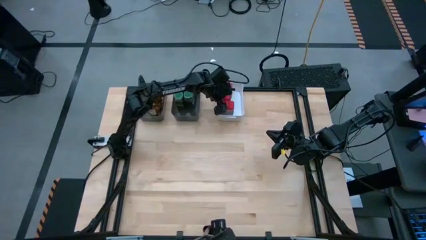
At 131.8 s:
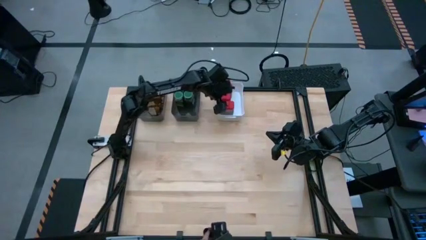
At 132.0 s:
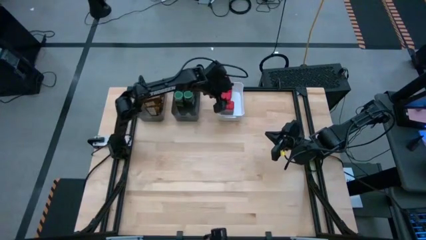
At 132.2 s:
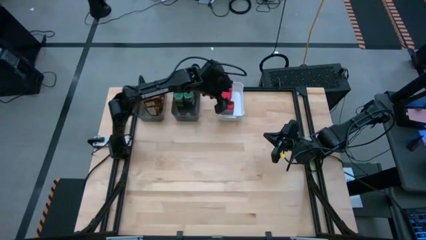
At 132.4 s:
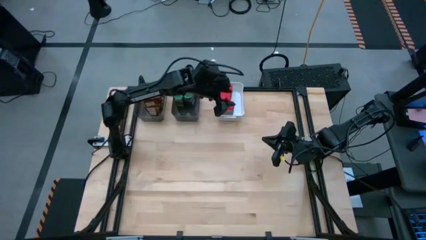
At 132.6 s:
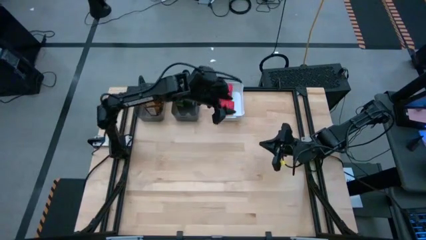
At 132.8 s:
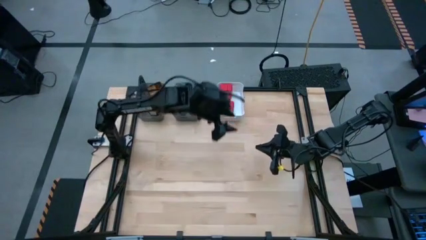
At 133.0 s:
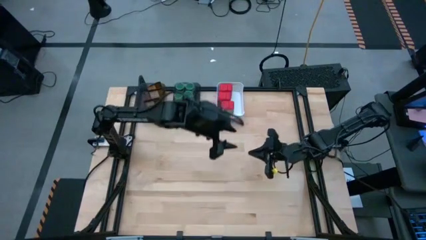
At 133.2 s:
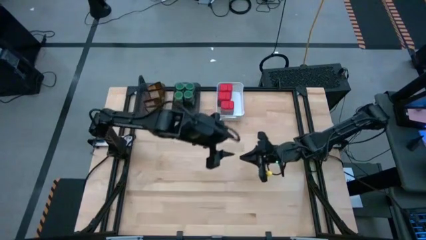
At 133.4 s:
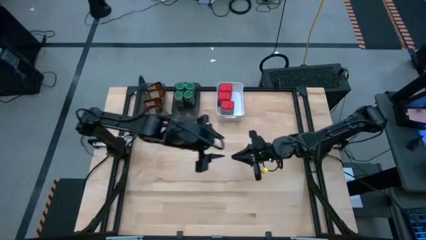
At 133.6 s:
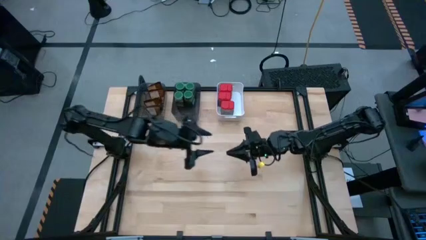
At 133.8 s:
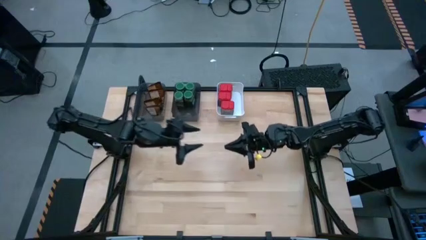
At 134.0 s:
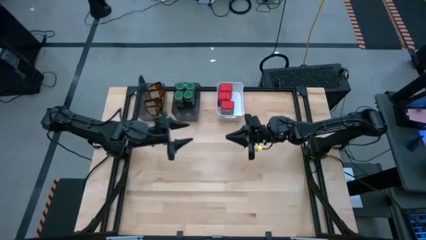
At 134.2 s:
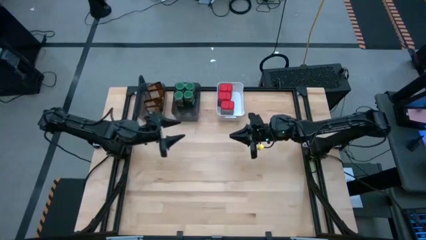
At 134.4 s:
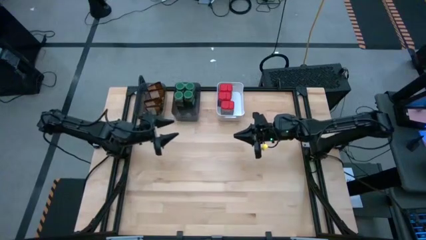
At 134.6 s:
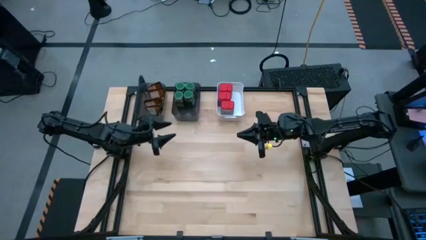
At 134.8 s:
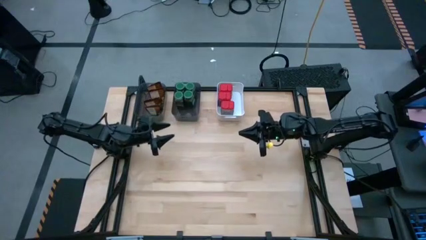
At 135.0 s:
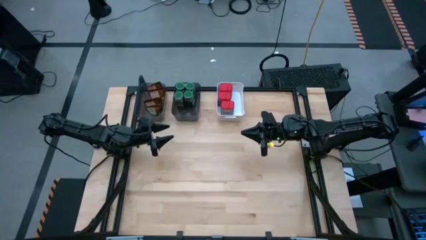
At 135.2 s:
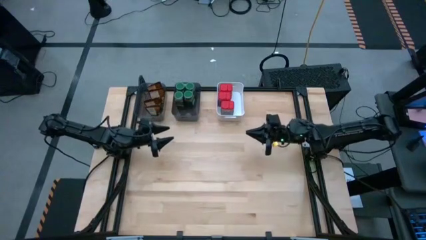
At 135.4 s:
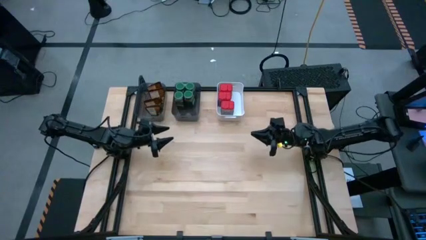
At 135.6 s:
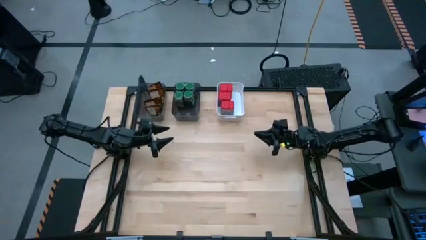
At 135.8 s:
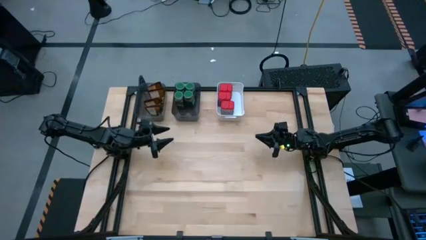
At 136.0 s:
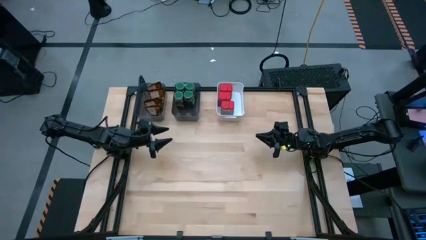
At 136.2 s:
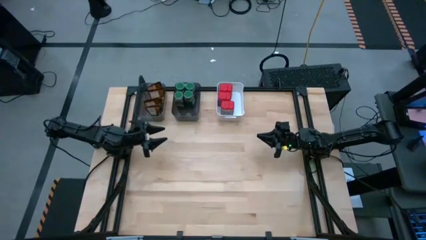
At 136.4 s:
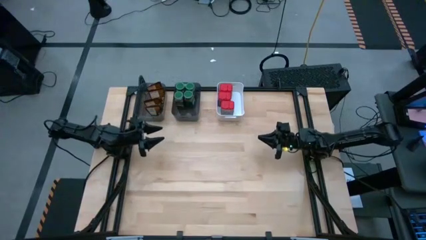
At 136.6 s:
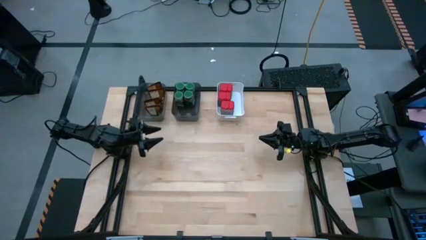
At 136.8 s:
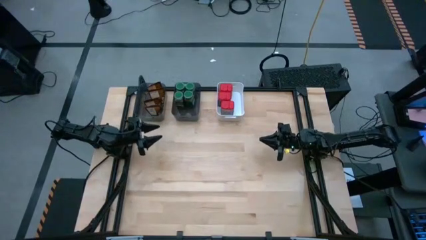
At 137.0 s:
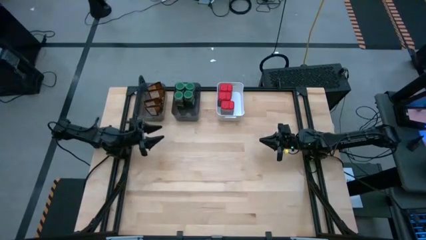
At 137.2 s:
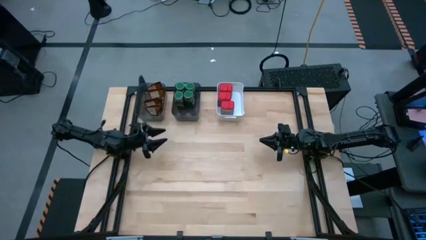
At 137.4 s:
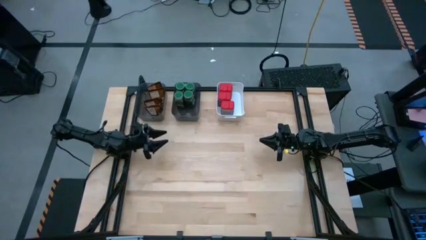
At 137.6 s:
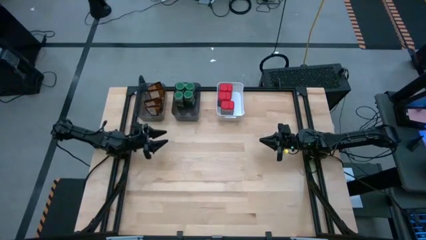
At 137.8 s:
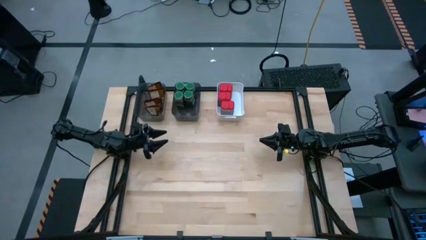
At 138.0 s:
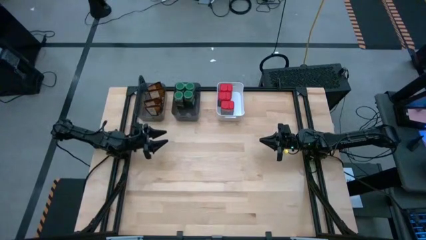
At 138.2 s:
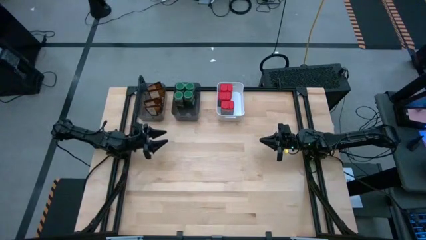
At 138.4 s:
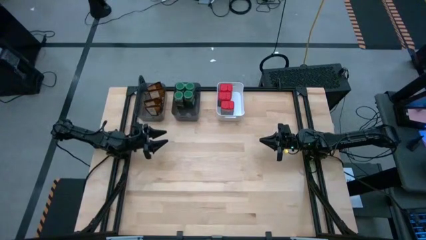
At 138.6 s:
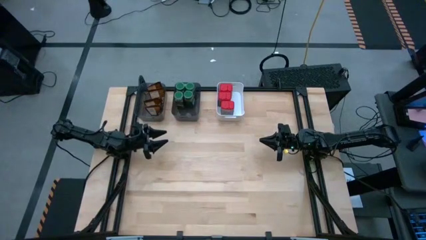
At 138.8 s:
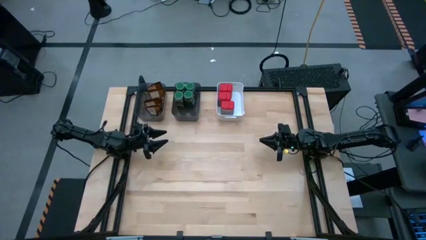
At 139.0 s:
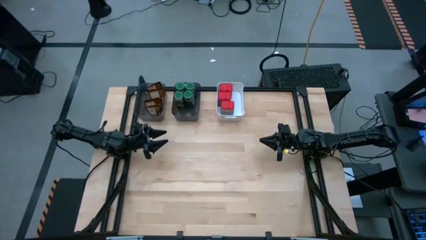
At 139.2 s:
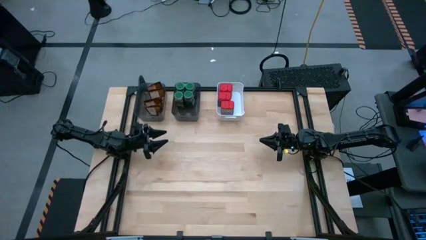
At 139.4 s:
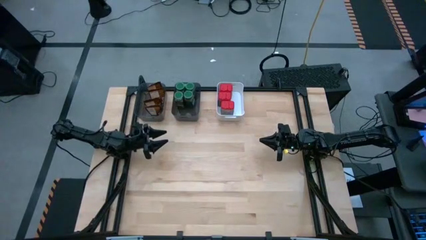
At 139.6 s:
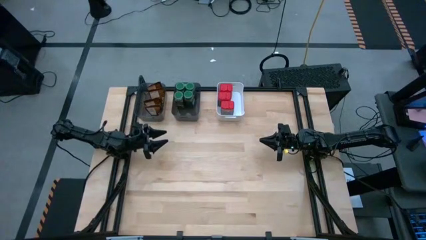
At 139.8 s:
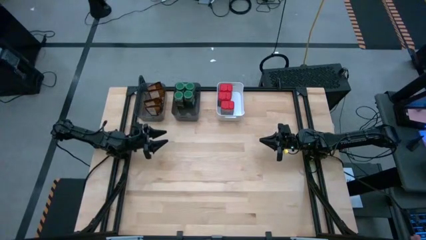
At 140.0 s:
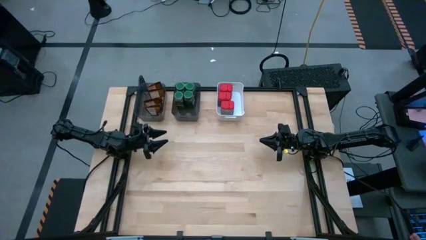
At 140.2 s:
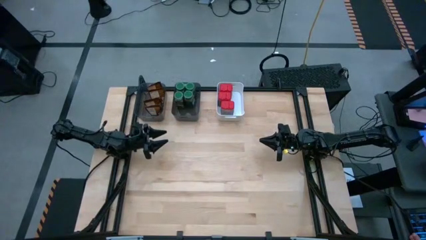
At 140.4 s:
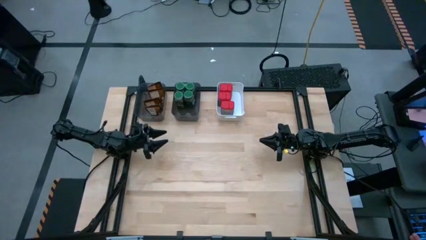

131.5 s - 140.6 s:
Task: Sort spices by type
Return to Home Position

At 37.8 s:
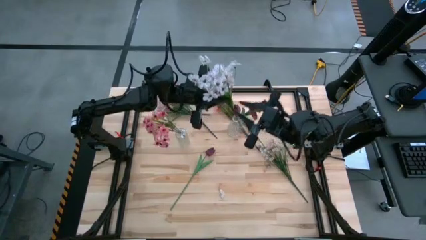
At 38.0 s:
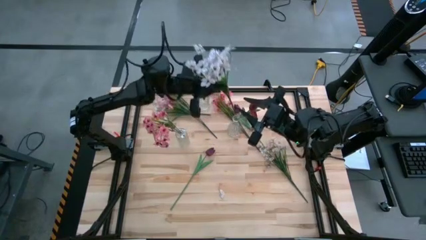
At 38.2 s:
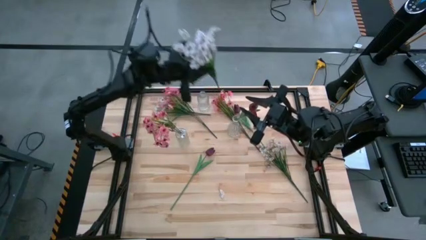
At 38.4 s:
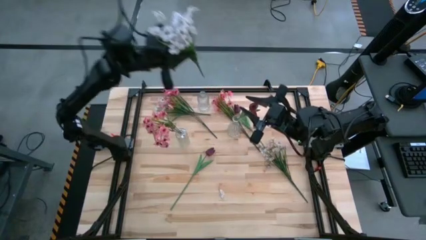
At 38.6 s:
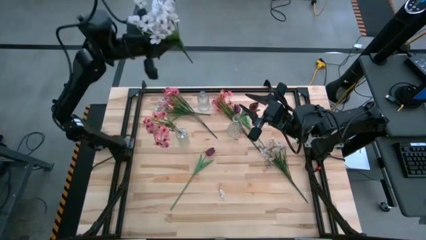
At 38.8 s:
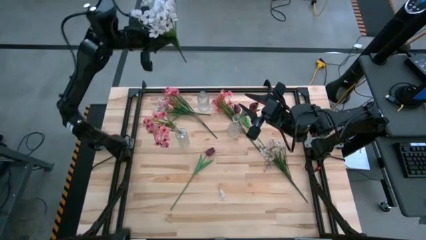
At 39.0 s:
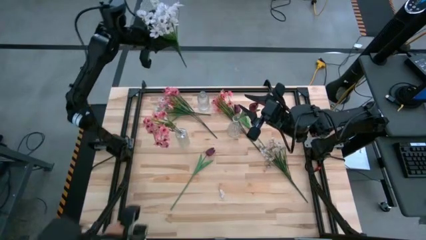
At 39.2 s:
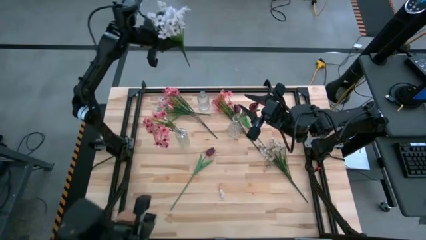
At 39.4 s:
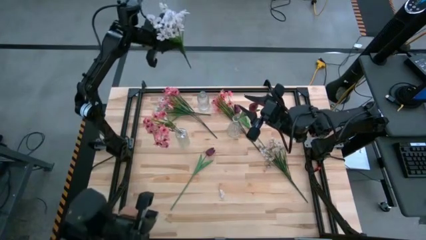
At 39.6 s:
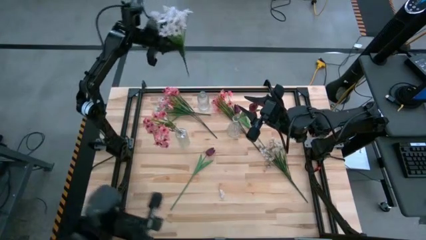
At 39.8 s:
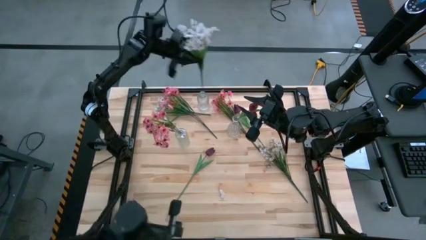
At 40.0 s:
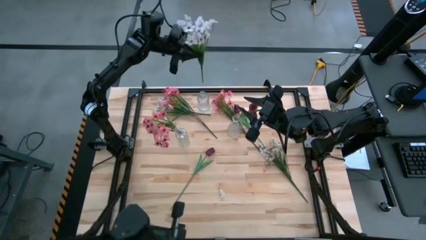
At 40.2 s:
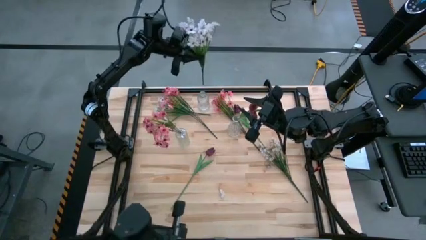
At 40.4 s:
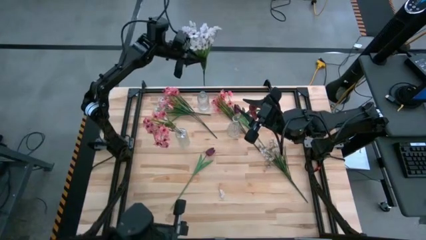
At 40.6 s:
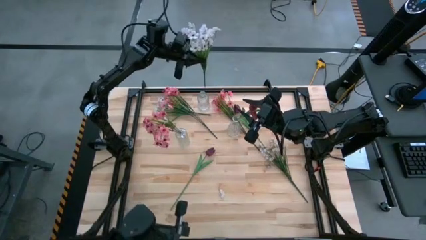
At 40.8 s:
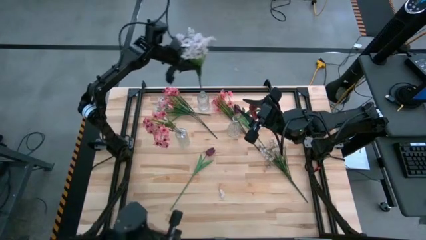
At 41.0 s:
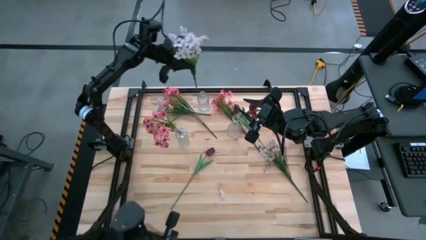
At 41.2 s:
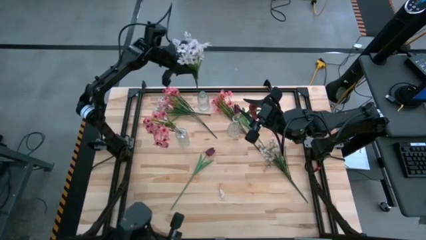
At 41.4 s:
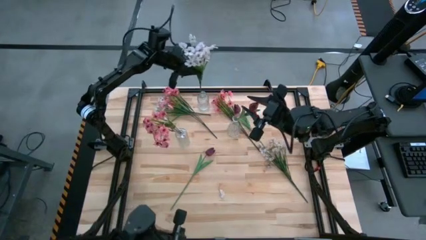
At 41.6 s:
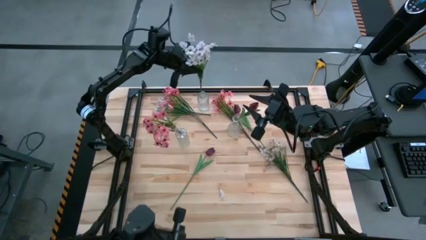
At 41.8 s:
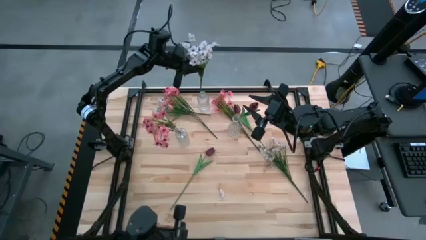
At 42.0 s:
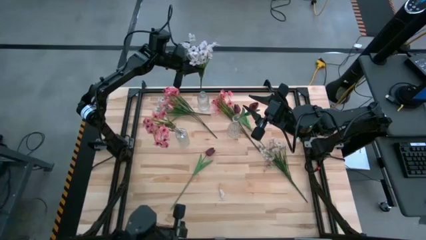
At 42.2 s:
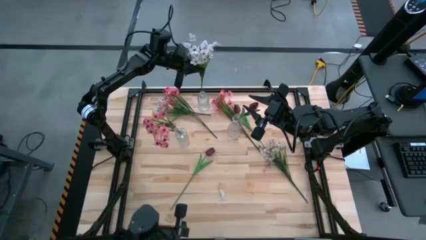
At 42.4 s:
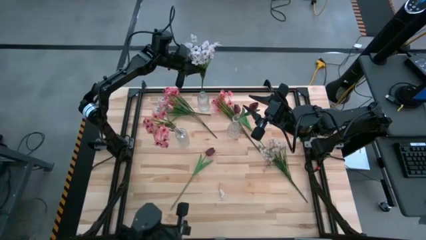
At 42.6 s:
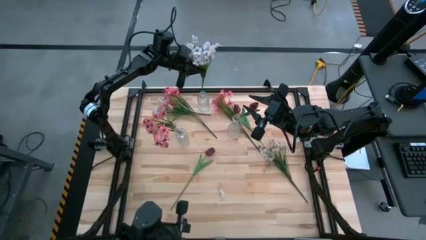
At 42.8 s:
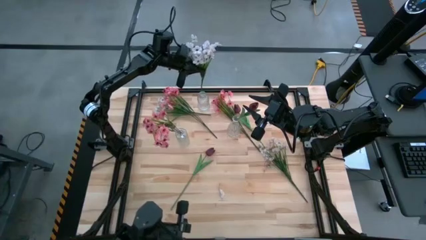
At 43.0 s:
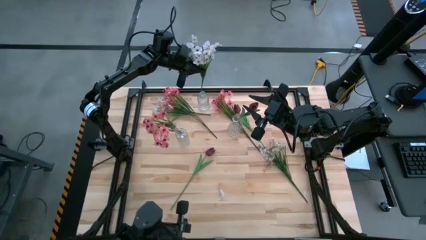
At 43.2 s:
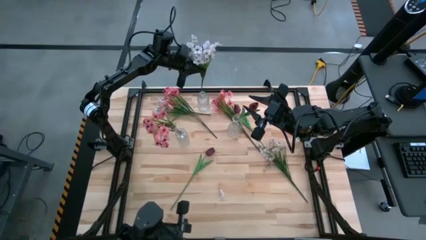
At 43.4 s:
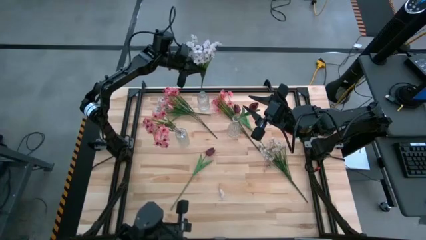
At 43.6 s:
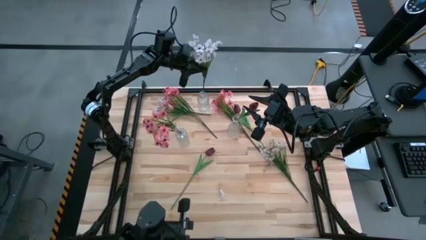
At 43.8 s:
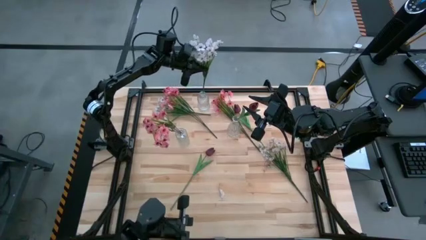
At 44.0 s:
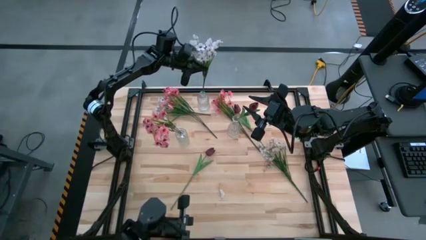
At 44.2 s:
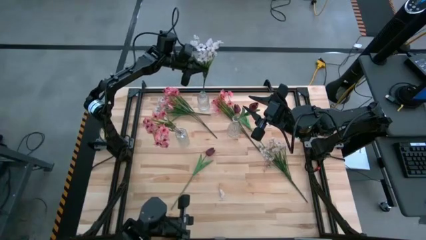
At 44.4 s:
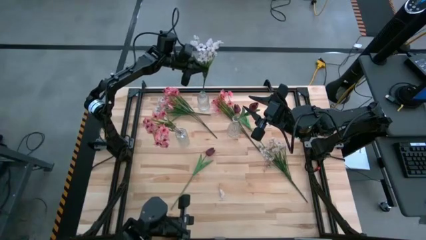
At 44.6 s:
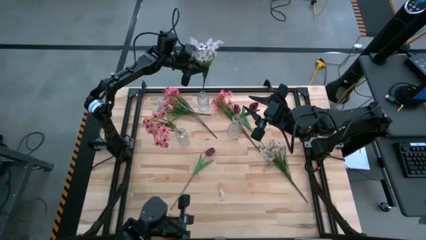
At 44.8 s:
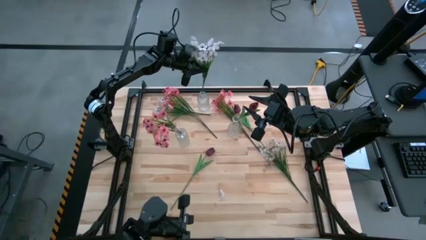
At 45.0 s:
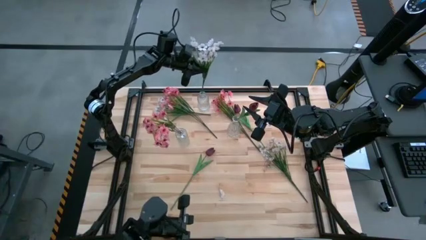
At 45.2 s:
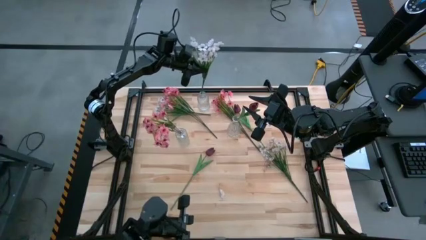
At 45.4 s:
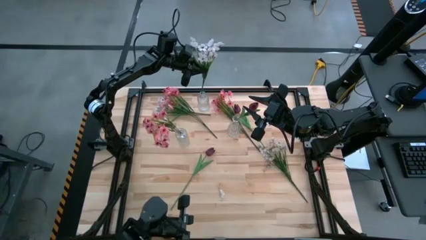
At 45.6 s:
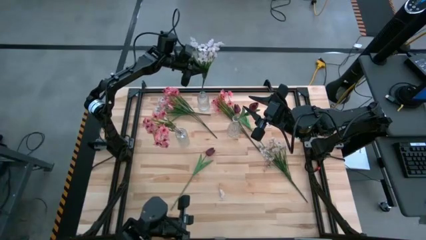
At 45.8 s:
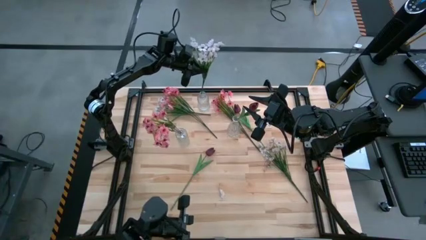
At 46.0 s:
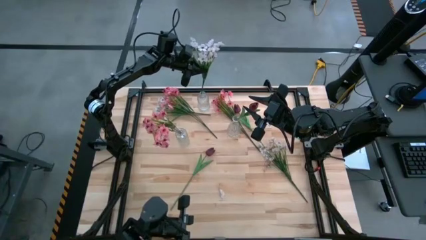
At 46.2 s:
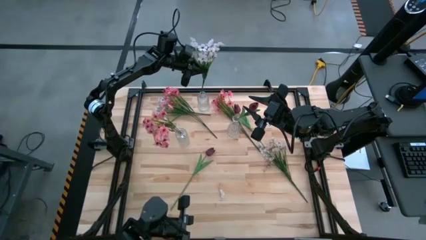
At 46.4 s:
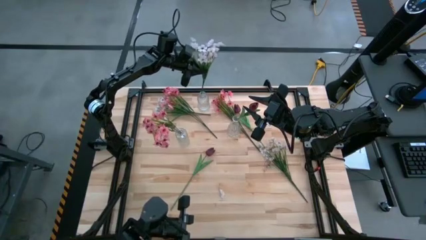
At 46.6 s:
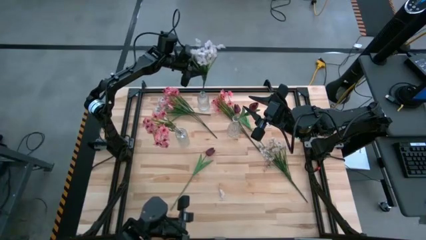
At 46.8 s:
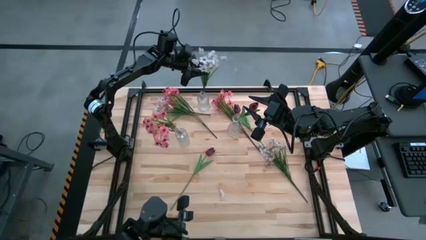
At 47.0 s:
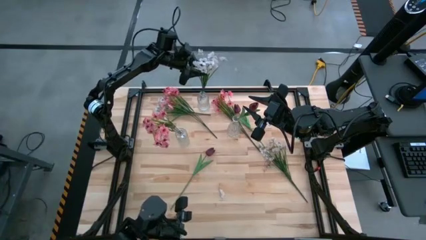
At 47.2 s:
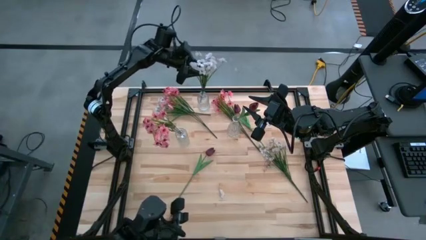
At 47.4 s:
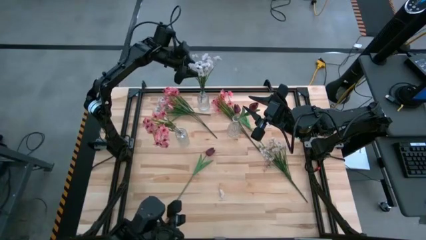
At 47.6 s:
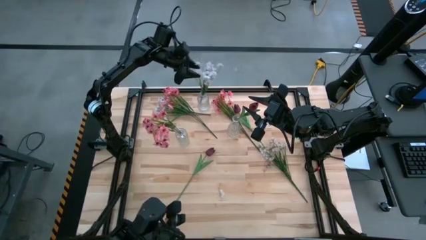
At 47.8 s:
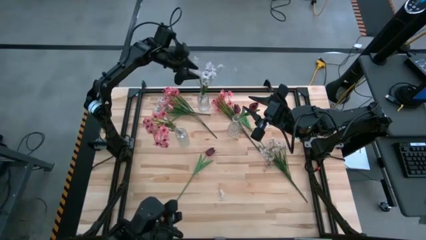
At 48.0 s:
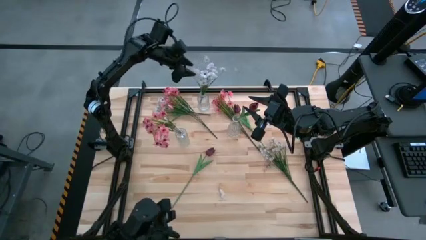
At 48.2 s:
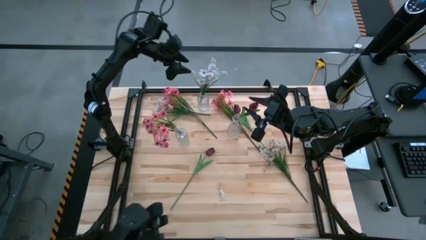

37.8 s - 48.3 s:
Task: Sort flowers into vase by color
Put the center white flowers into the top transparent vase
